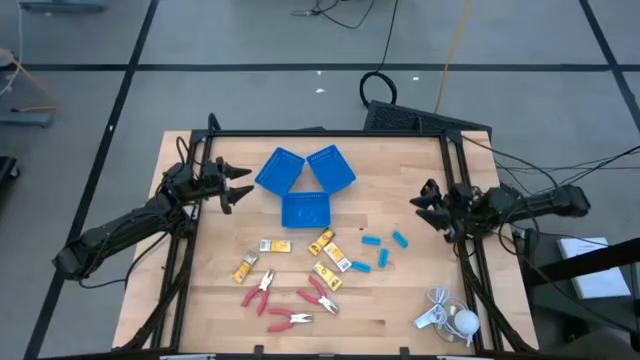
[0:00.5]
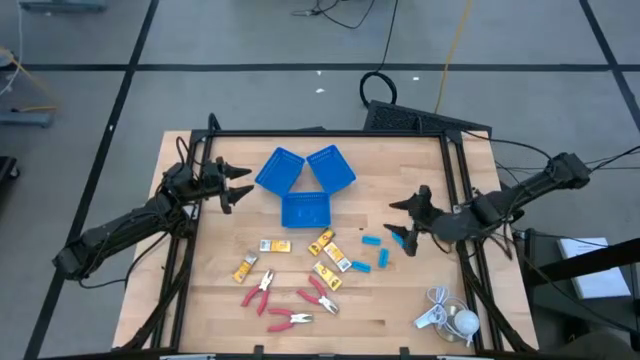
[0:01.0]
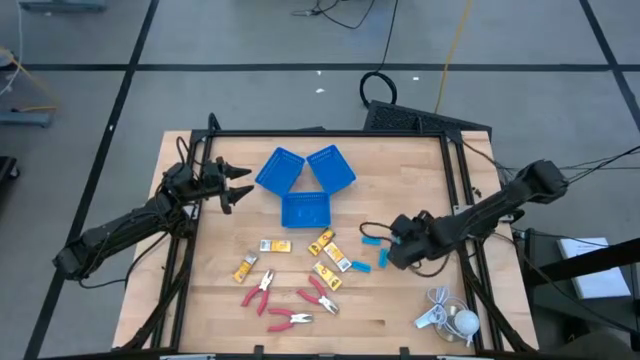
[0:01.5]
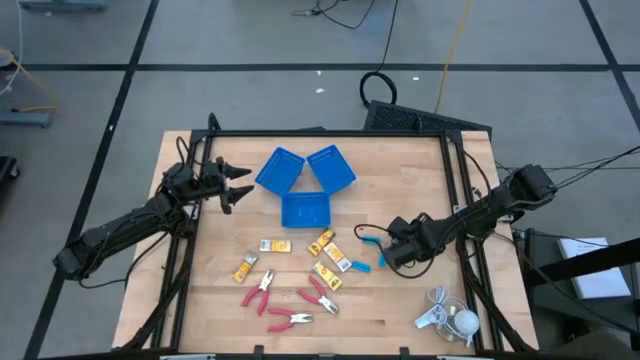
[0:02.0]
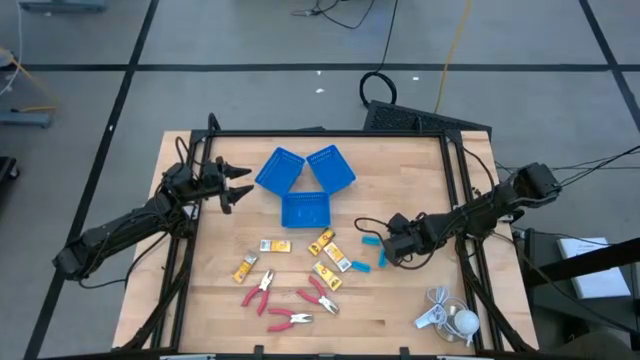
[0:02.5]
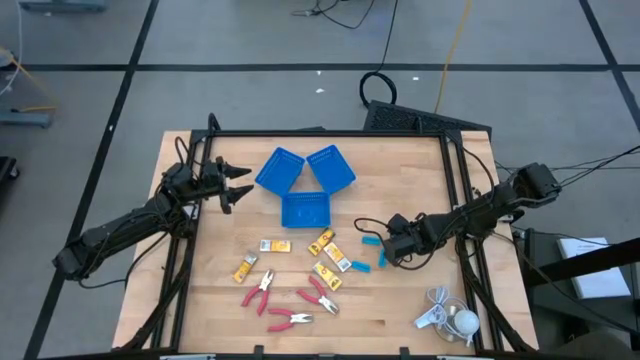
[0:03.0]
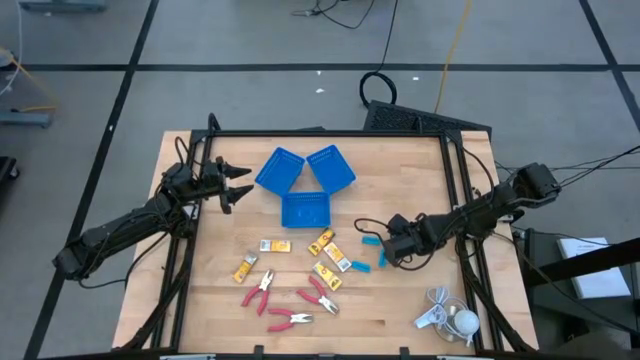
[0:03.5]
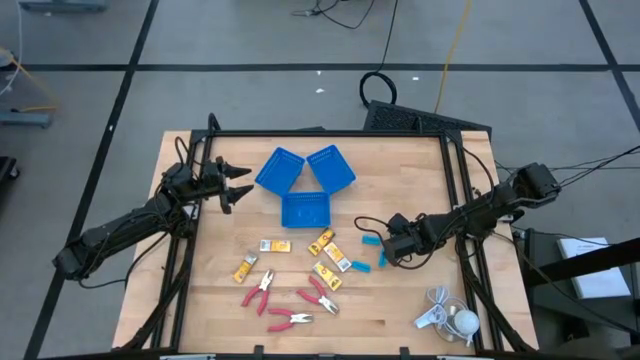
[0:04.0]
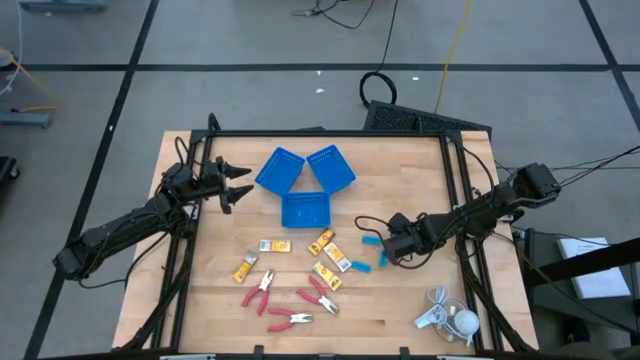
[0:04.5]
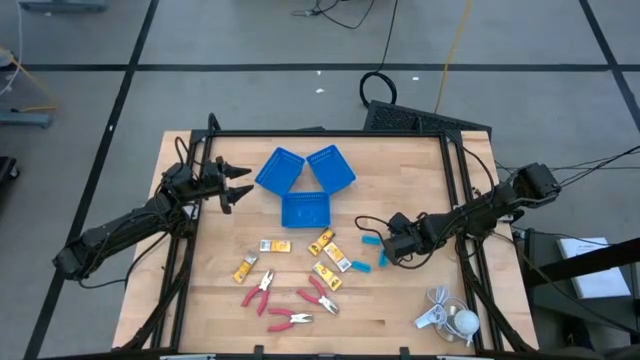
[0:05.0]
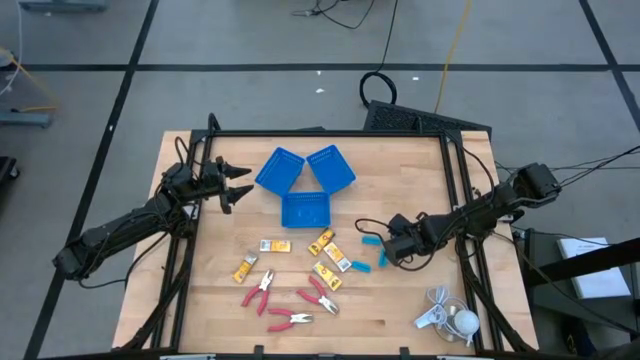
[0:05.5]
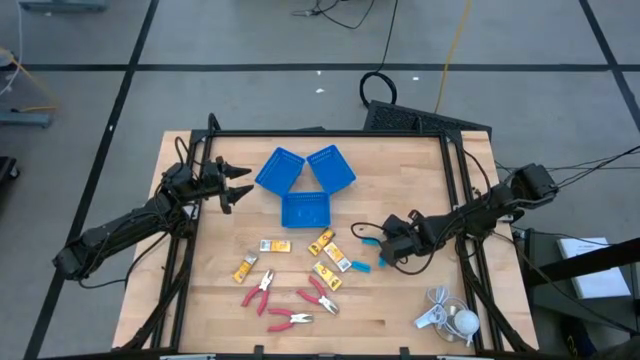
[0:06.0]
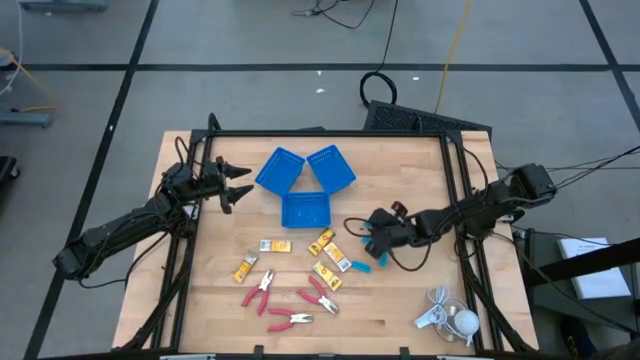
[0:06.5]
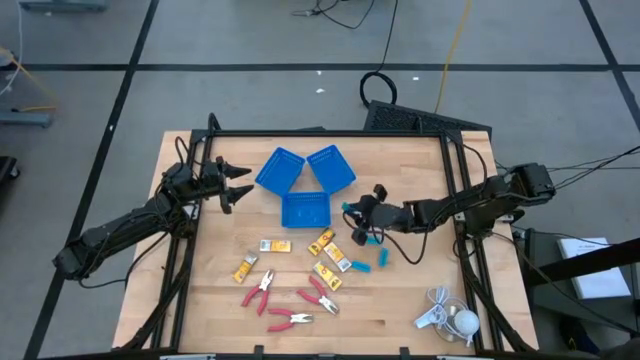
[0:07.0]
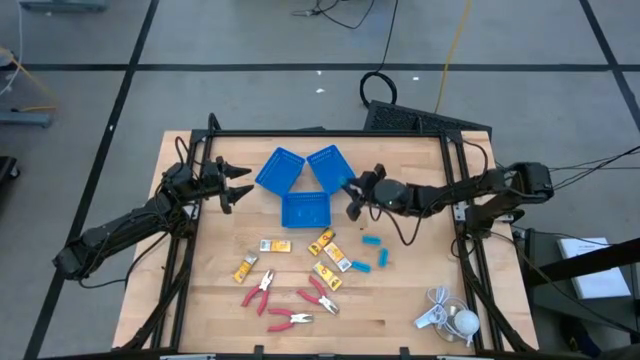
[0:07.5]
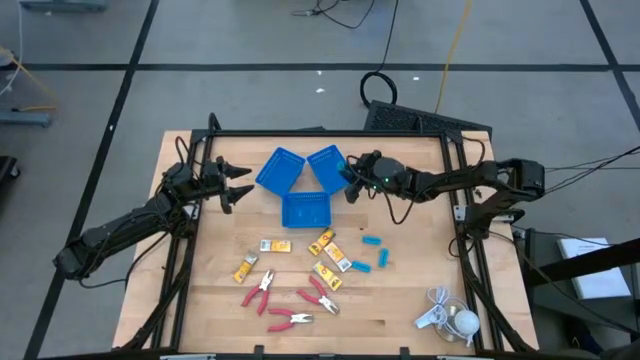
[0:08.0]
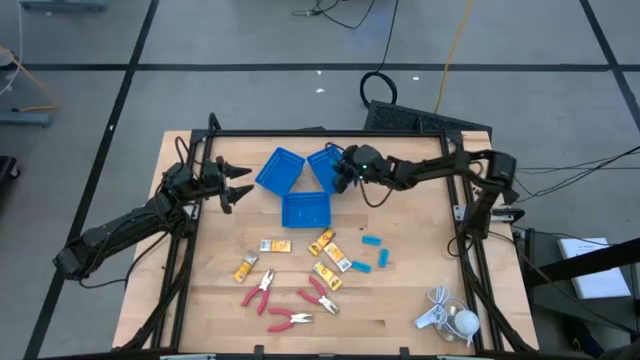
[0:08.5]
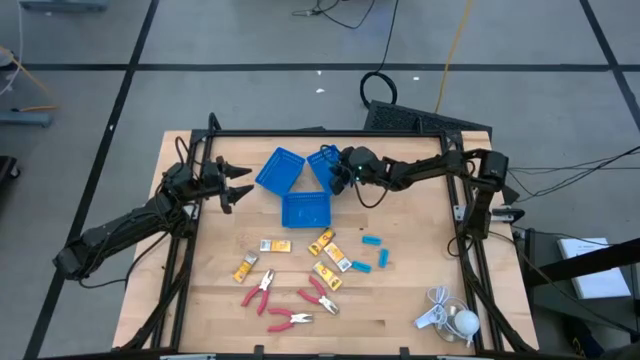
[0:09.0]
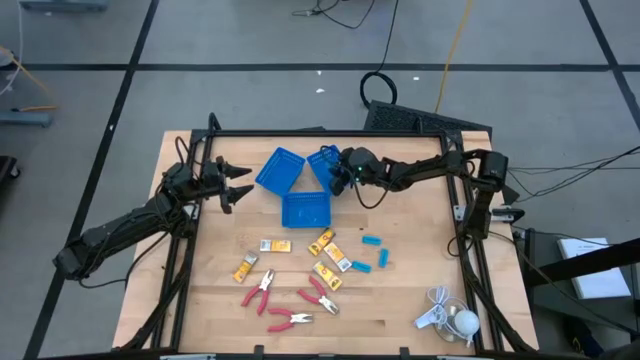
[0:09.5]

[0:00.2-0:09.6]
Task: Pick & Place School Supplies
Put the blue eraser into the top right blue bin

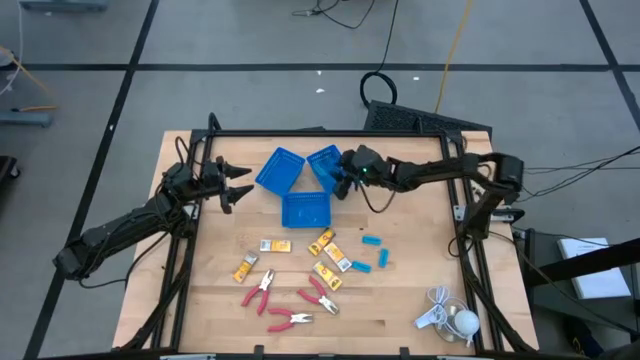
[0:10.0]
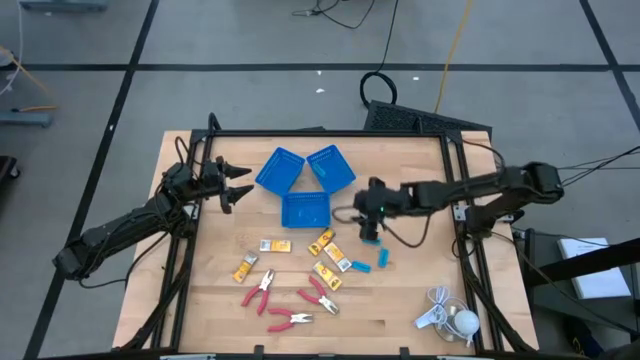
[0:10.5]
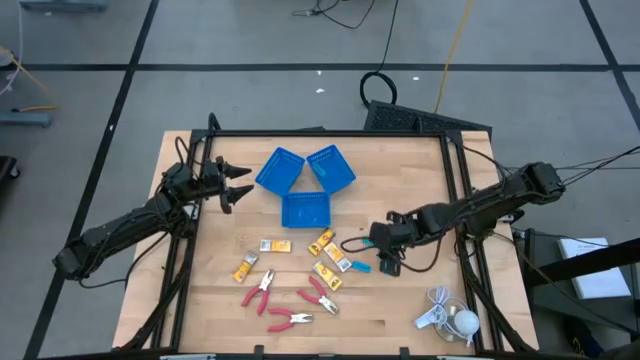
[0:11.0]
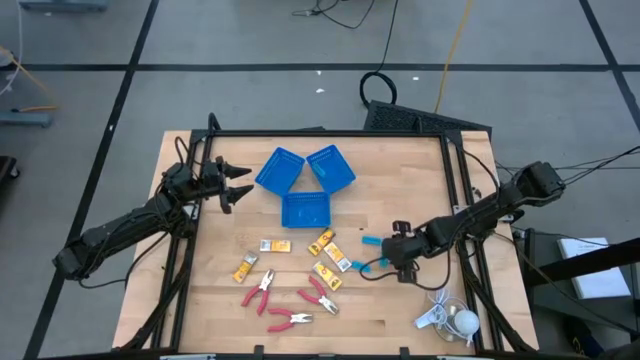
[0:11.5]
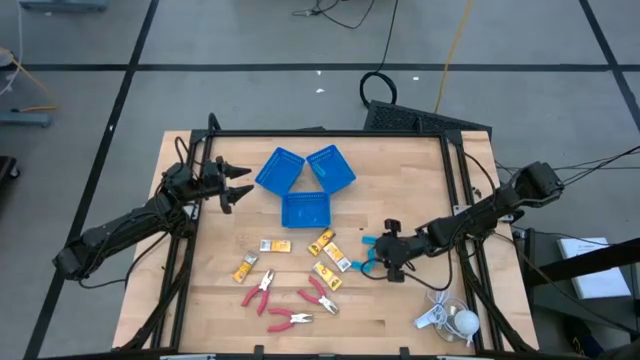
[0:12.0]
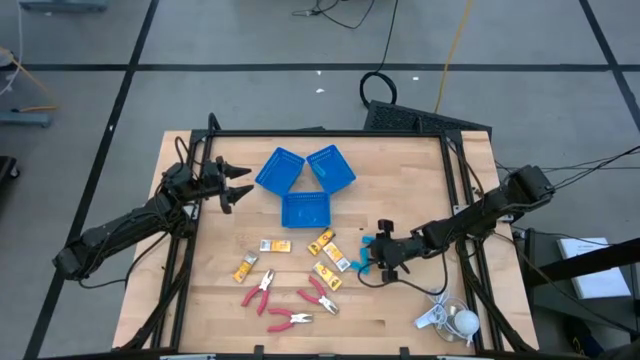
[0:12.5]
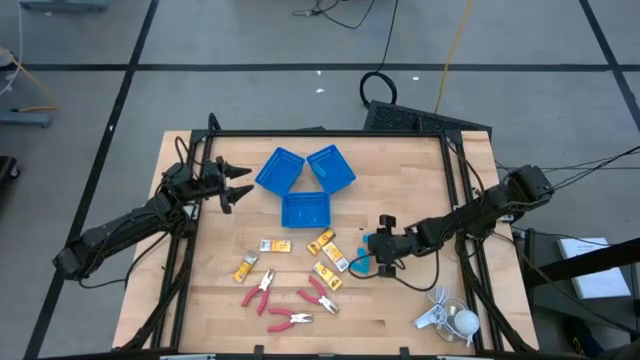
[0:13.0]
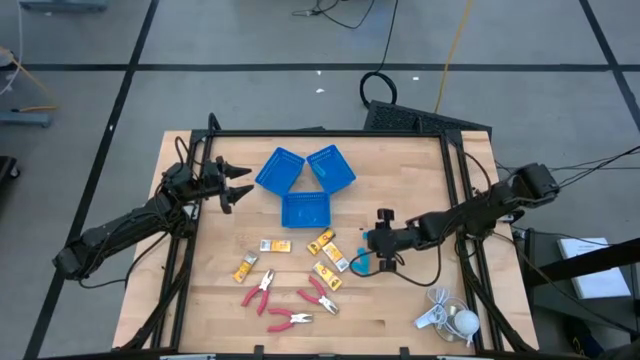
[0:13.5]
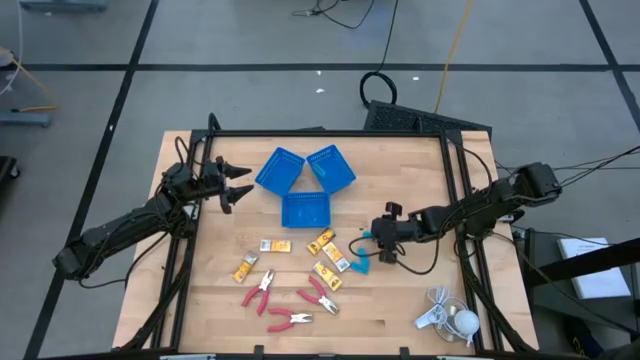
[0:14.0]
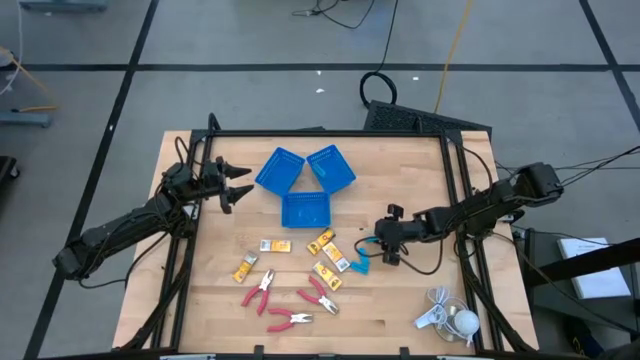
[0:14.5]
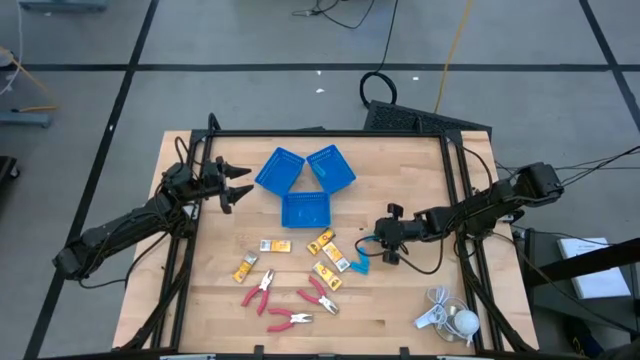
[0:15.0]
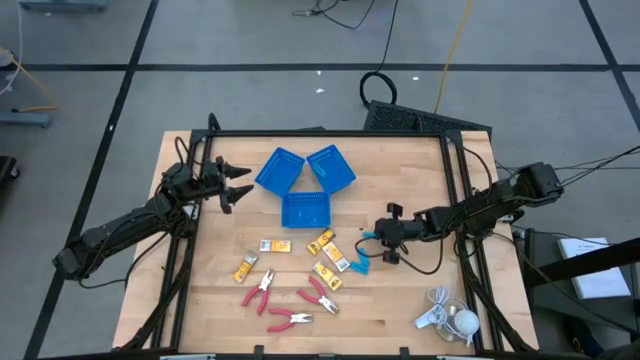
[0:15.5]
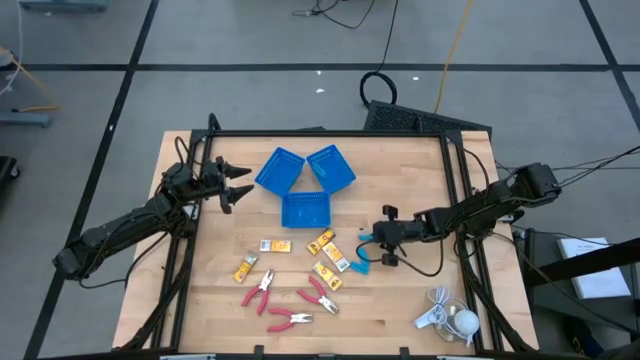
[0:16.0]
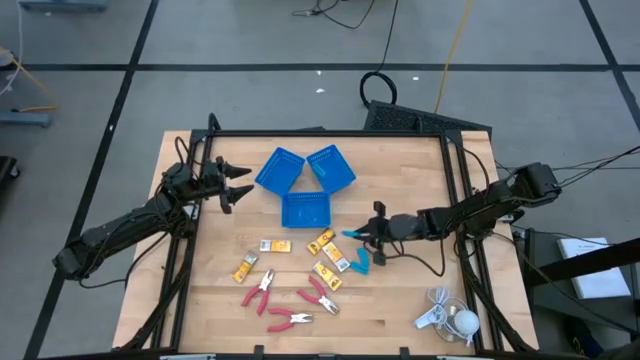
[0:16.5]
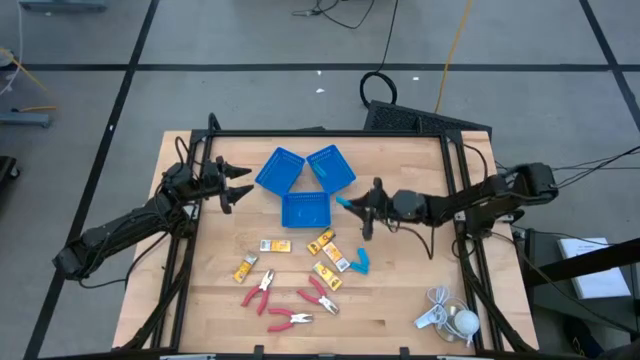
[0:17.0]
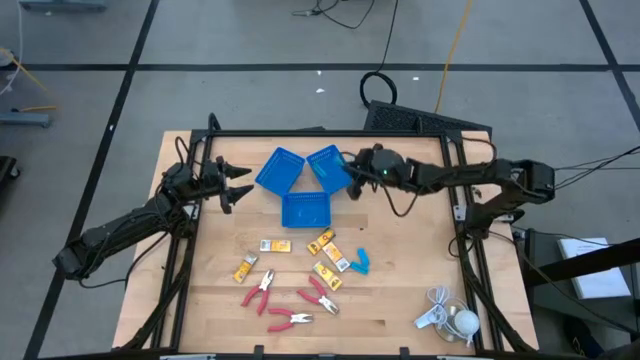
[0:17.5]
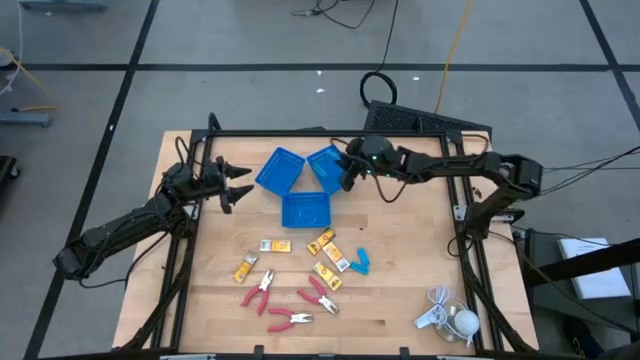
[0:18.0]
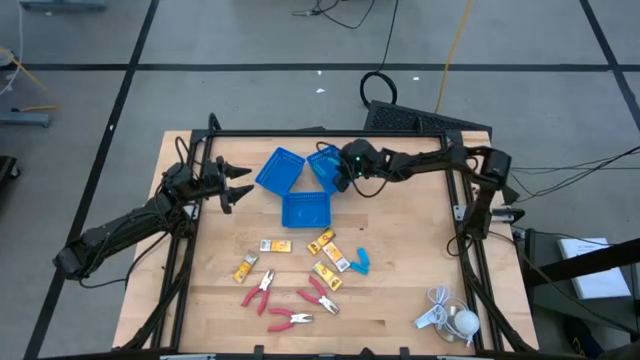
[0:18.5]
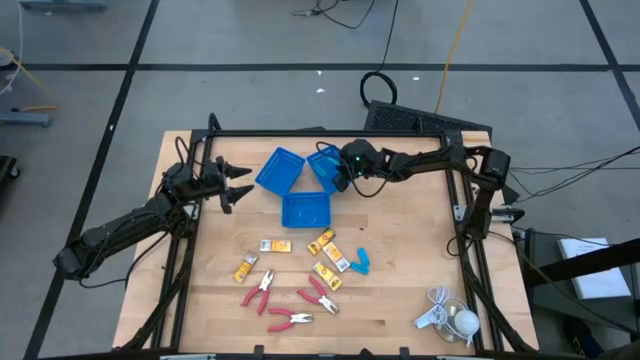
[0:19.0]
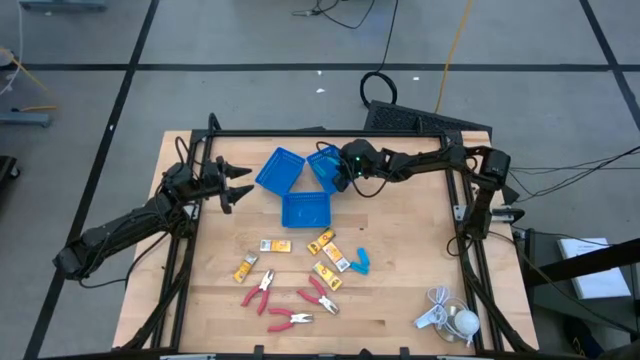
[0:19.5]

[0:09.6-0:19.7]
Put the blue eraser into the top right blue bin

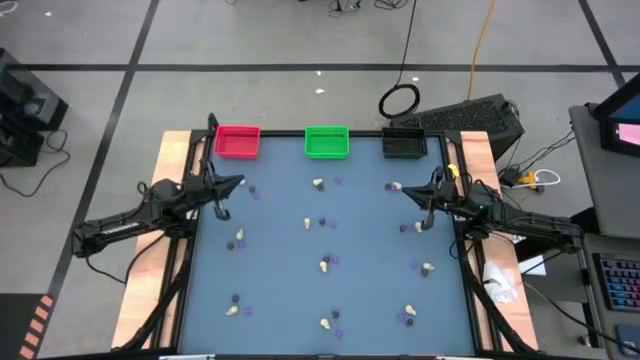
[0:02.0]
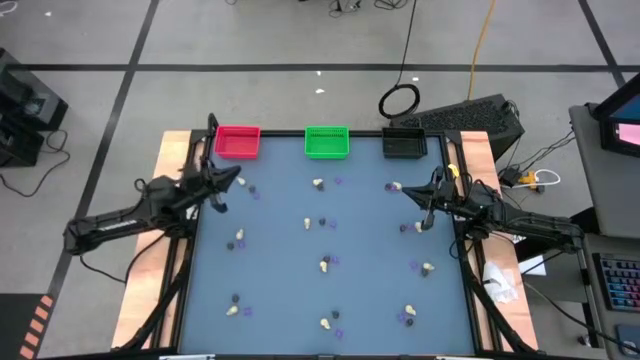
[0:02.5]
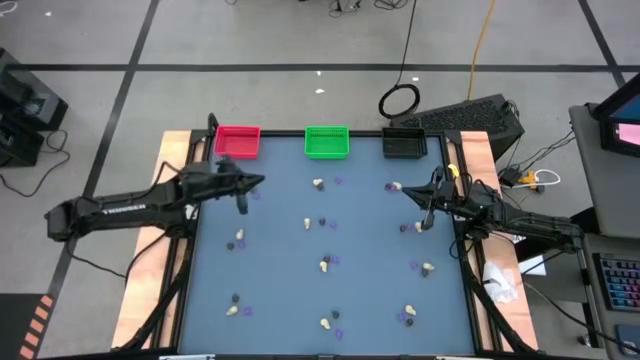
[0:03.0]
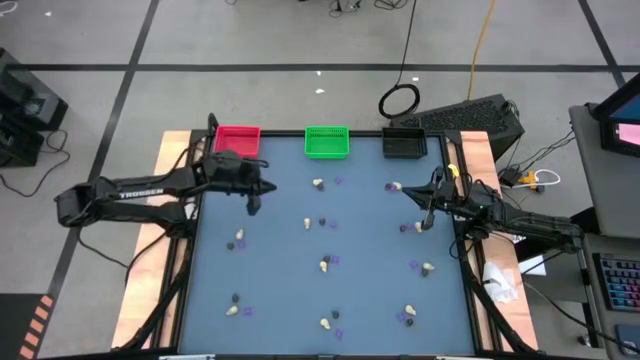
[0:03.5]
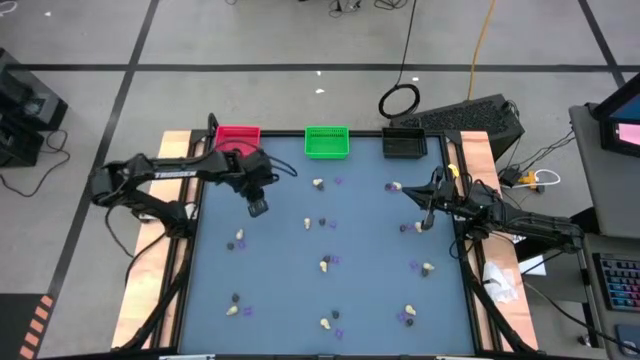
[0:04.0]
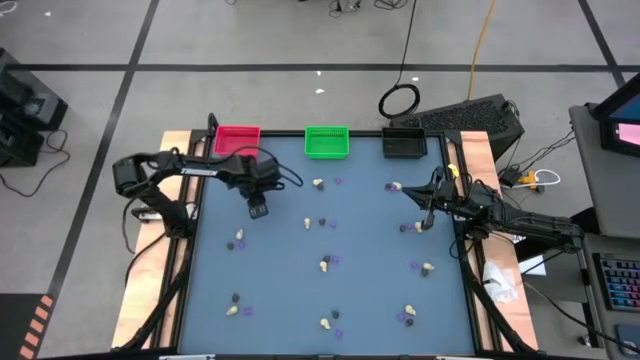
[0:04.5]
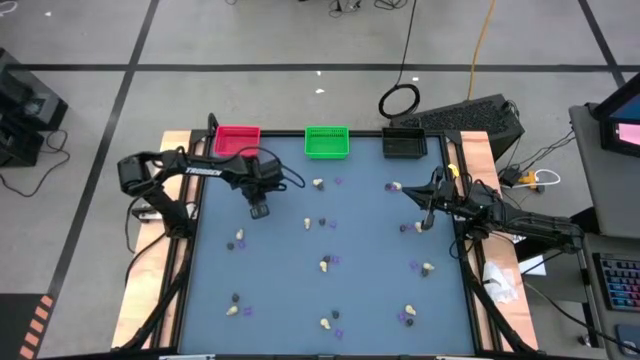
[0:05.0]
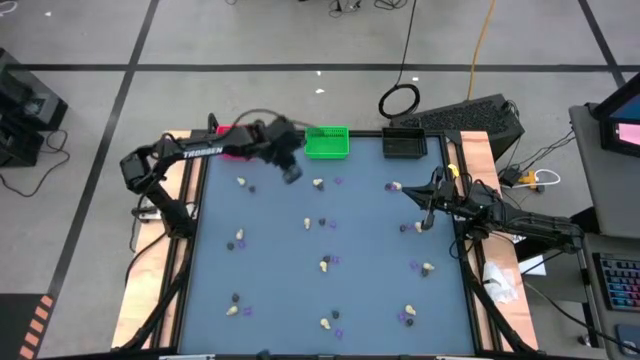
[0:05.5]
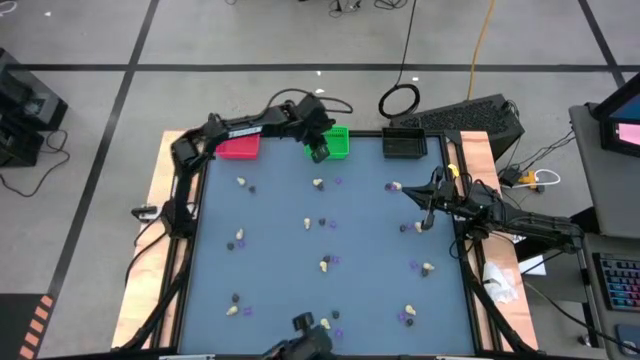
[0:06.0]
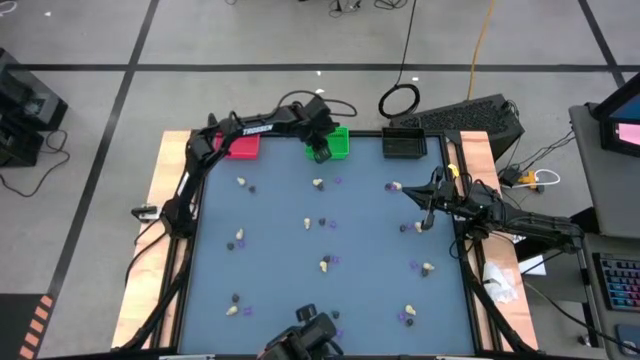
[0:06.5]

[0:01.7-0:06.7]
Task: Sort Halloween decoration
Put the purple spider toy into the green bin
